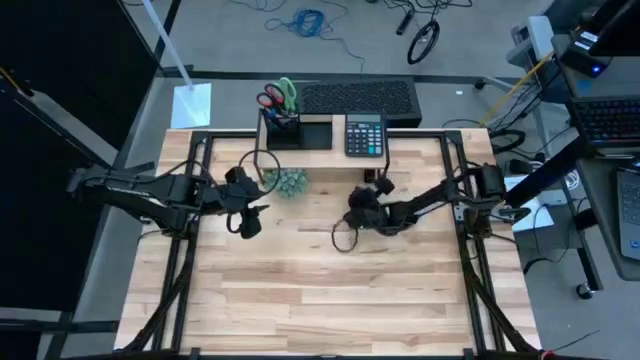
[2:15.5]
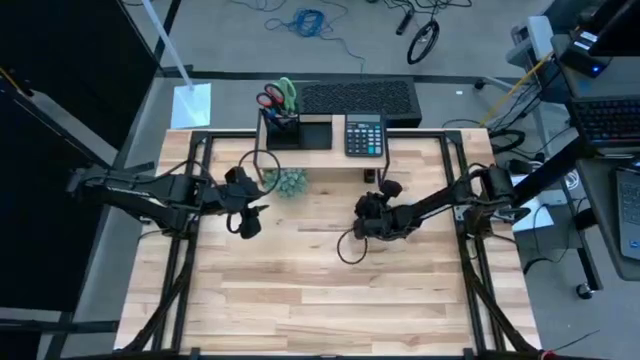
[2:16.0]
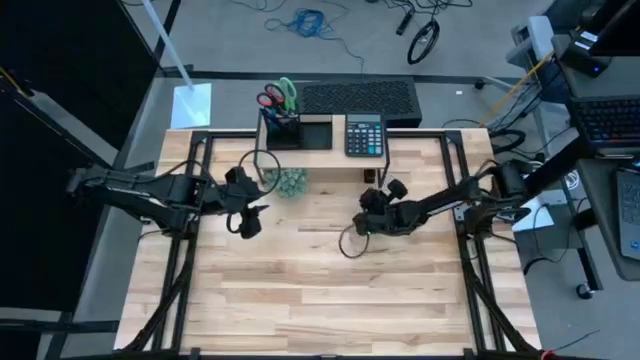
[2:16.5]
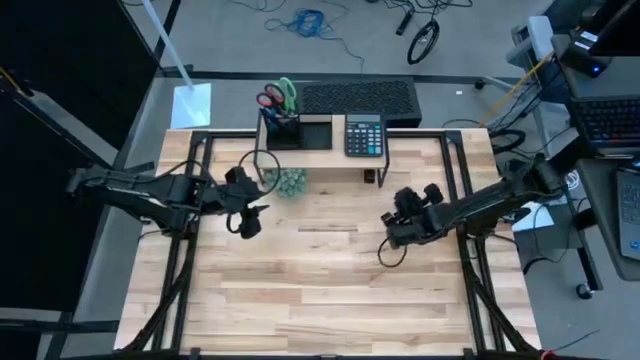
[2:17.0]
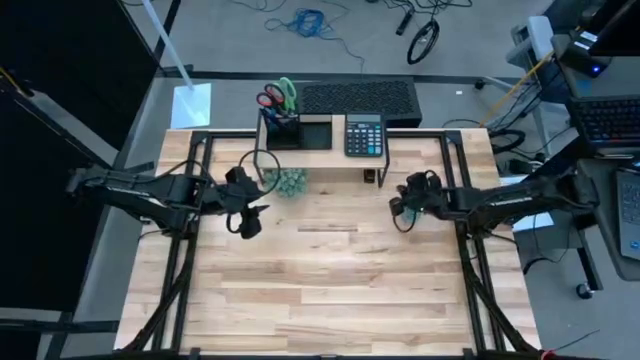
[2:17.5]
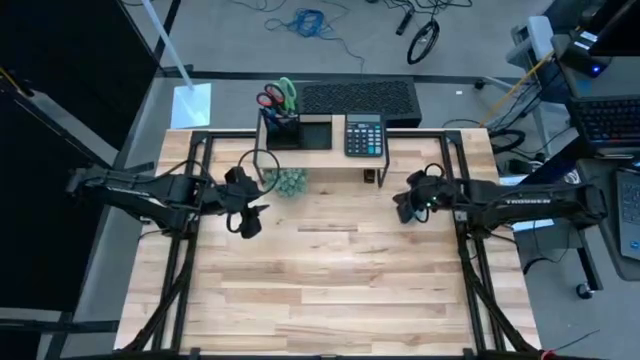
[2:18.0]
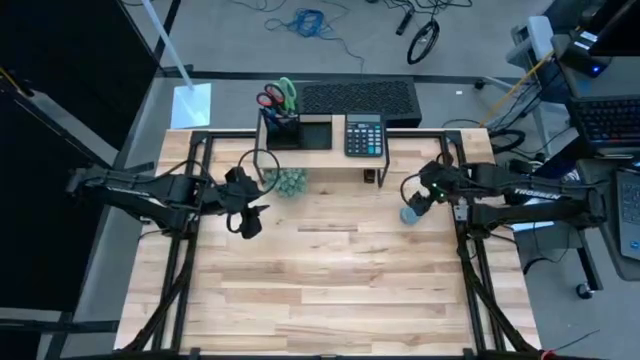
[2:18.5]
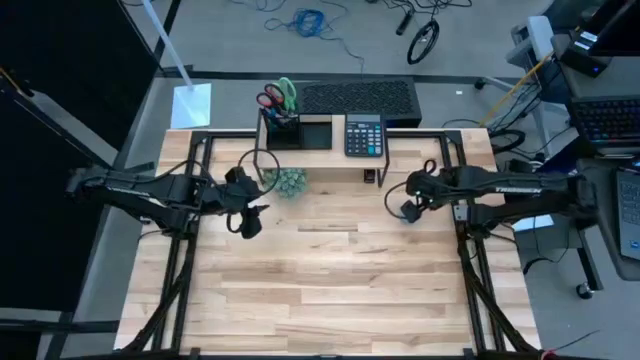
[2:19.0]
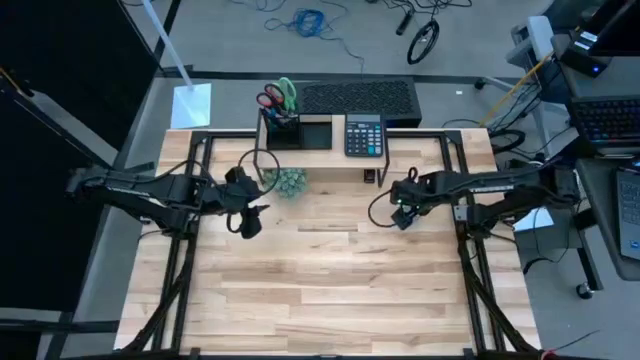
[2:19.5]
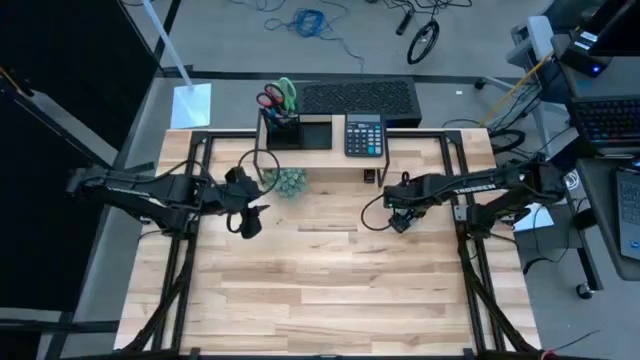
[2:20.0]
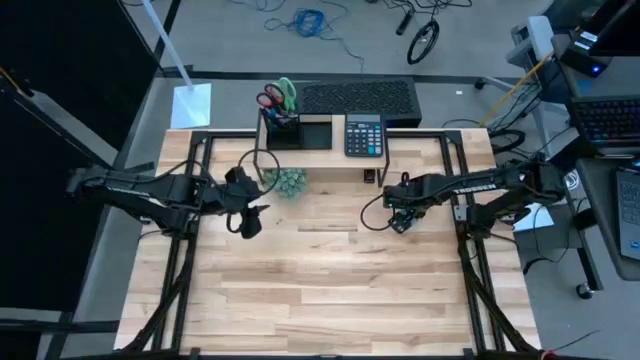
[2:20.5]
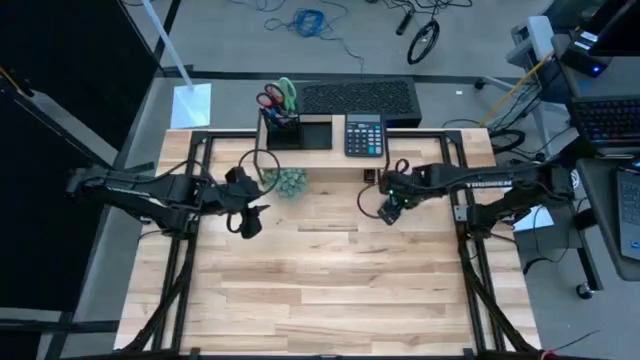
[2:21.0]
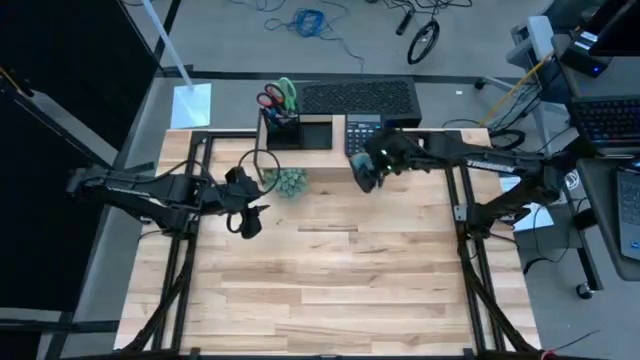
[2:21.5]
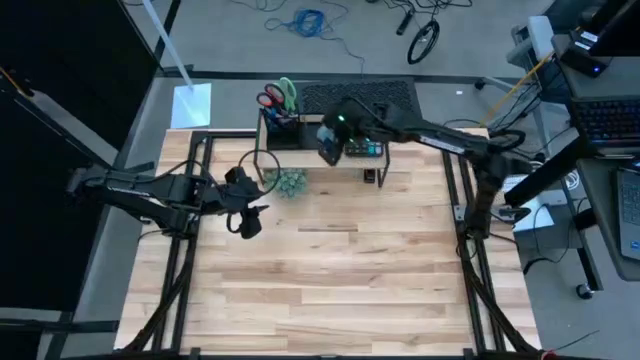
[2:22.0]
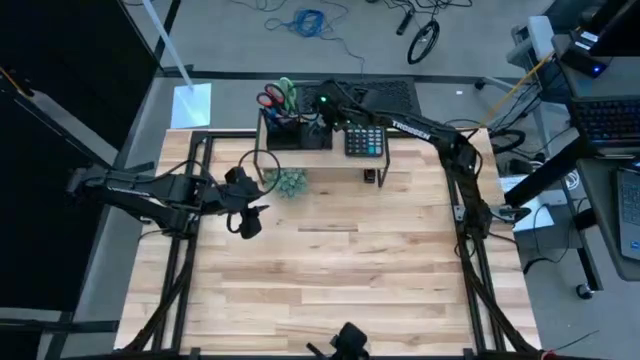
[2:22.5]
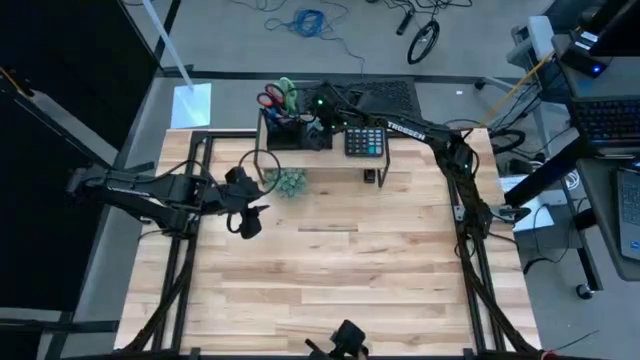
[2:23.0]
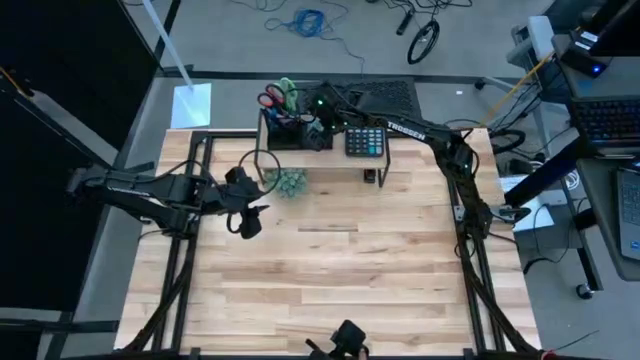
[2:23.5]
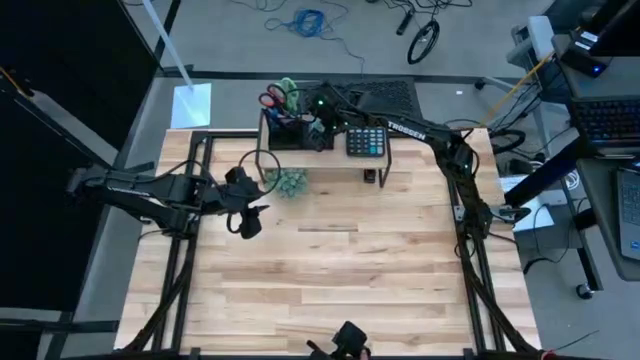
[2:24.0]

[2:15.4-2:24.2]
Task: Pick and place office supplies into organizer
Put the green scented candle into the desk organizer on the shelf

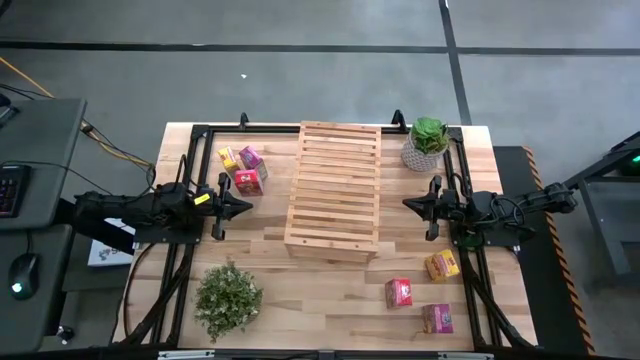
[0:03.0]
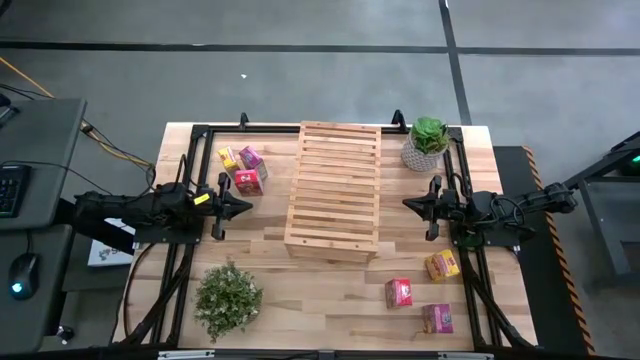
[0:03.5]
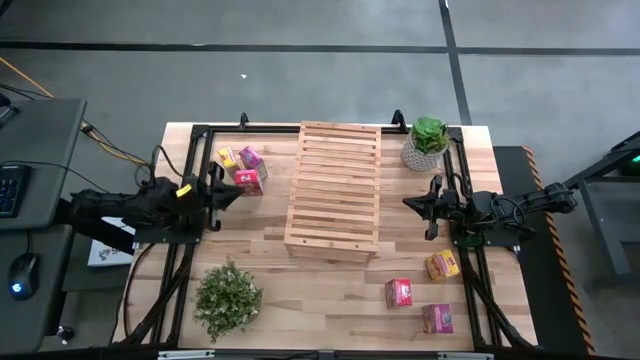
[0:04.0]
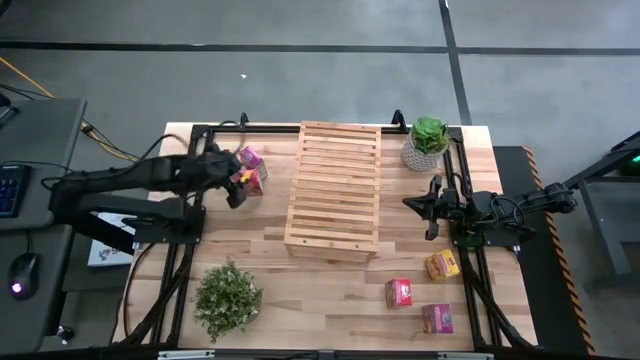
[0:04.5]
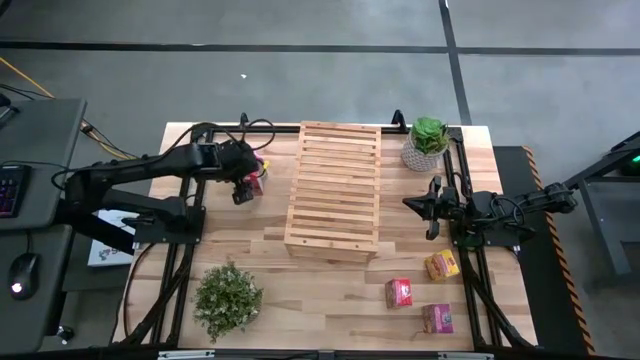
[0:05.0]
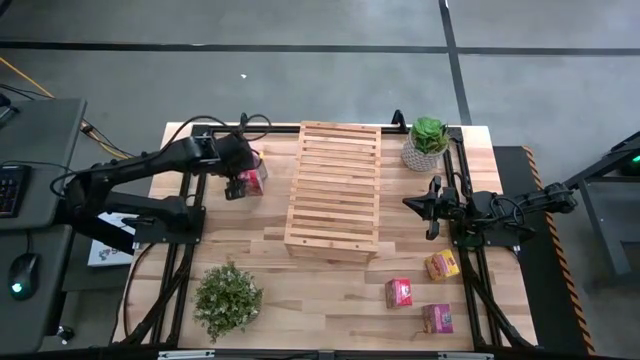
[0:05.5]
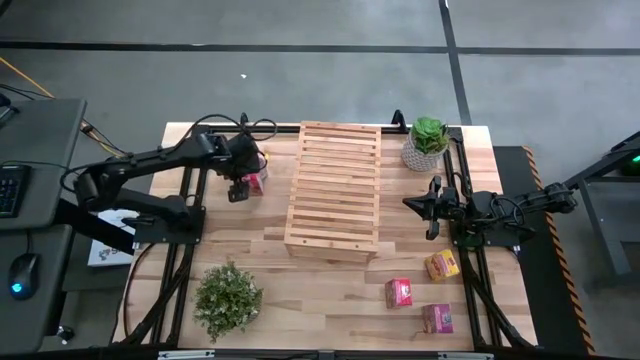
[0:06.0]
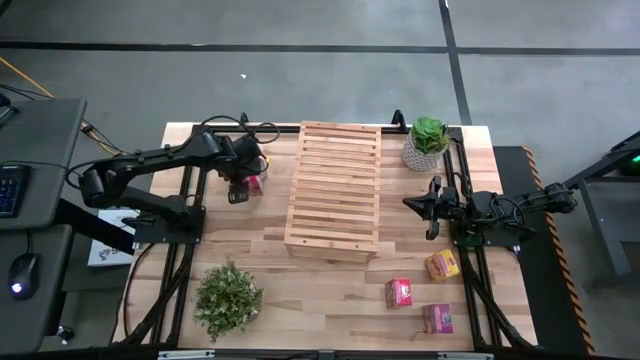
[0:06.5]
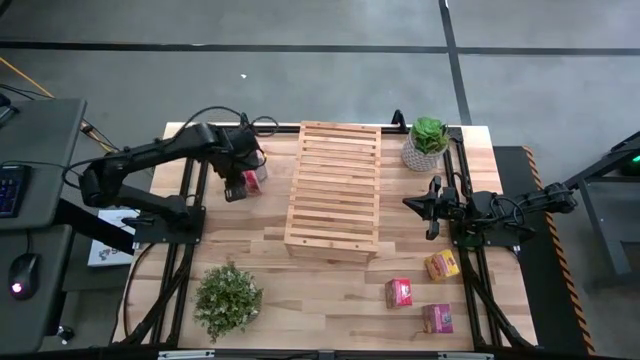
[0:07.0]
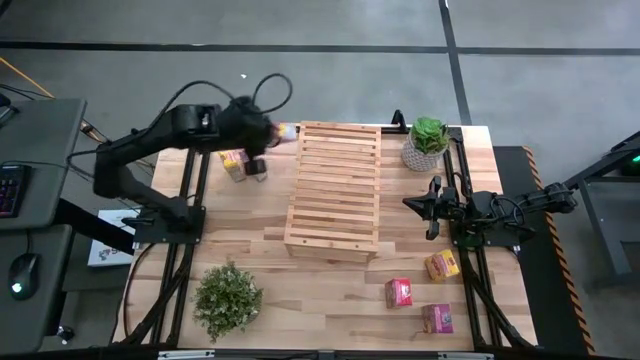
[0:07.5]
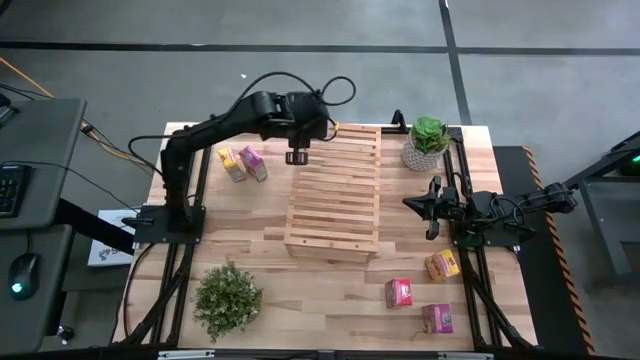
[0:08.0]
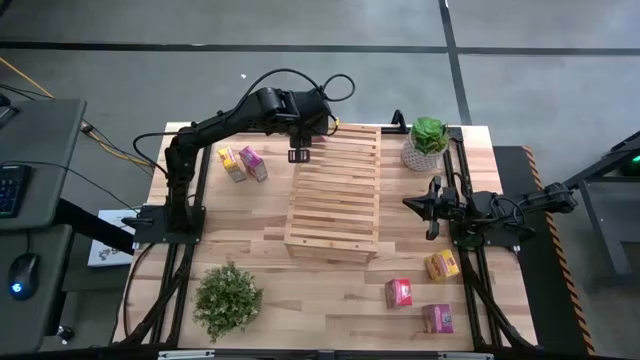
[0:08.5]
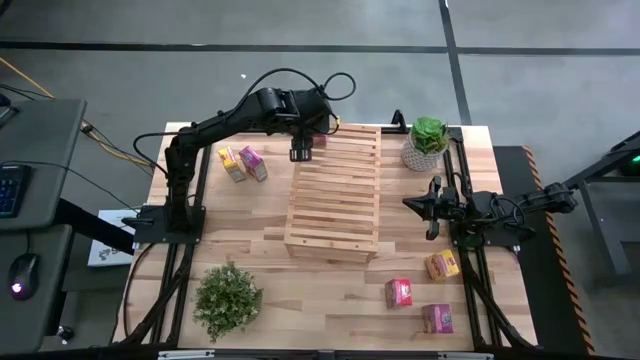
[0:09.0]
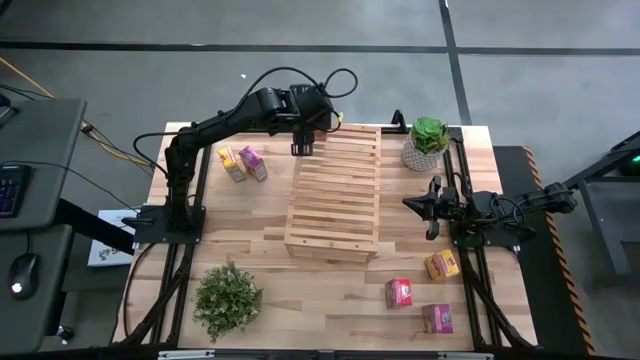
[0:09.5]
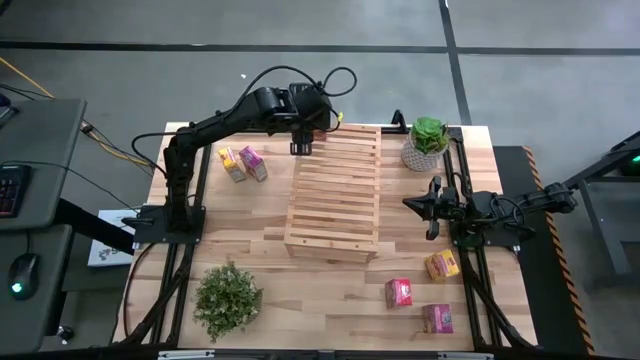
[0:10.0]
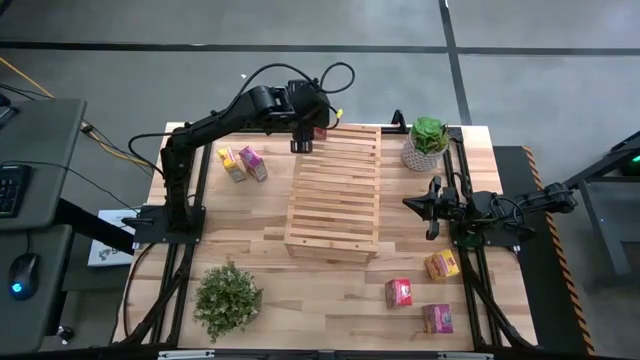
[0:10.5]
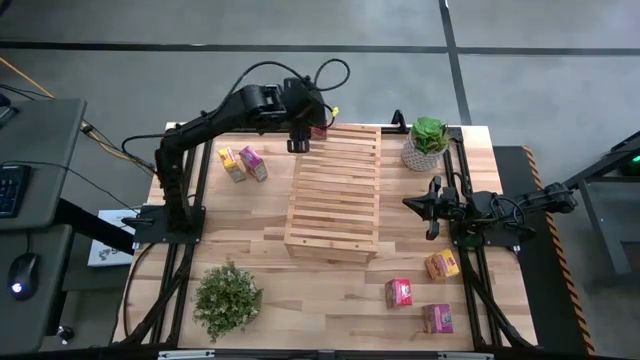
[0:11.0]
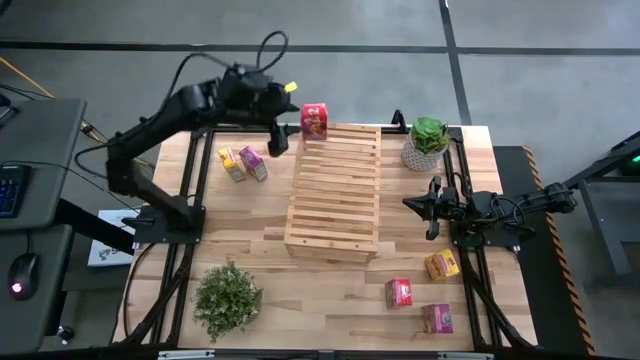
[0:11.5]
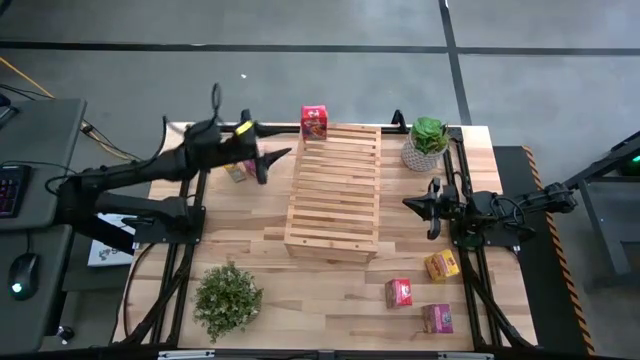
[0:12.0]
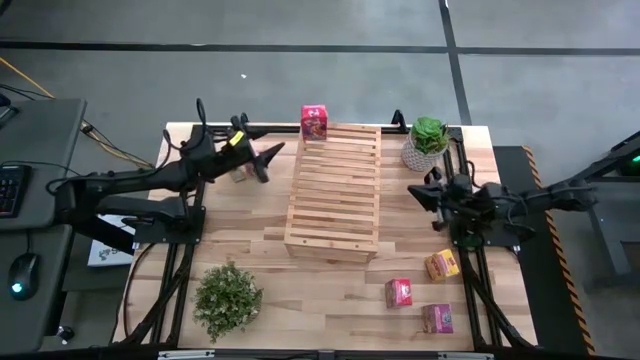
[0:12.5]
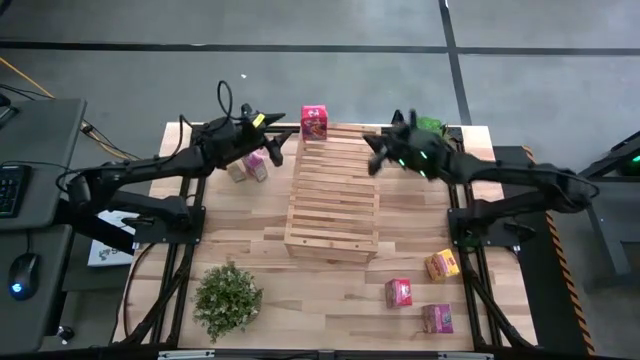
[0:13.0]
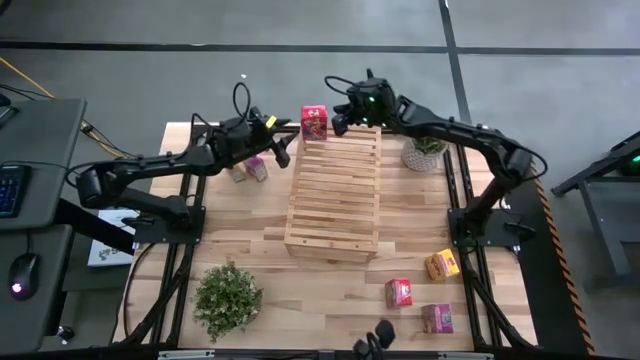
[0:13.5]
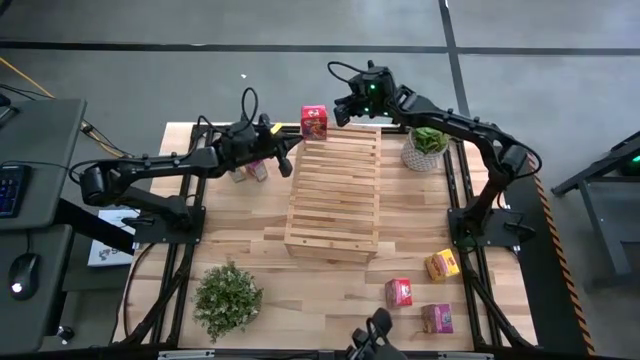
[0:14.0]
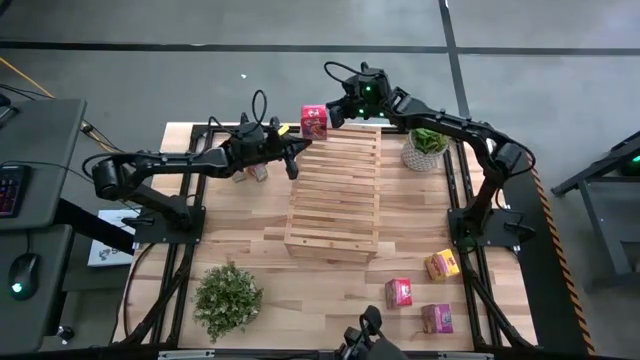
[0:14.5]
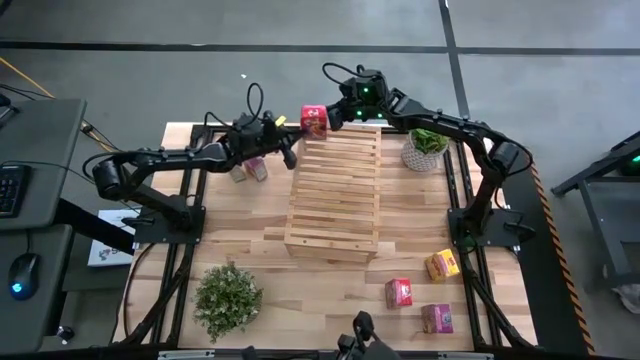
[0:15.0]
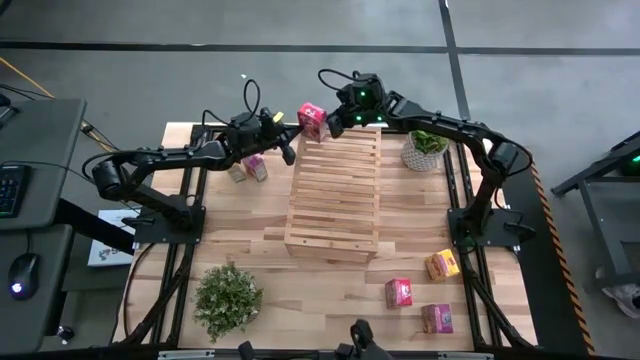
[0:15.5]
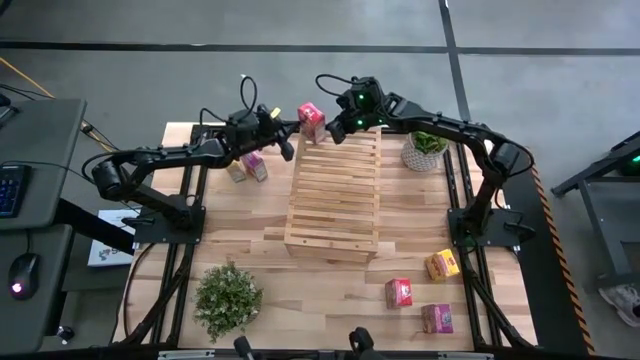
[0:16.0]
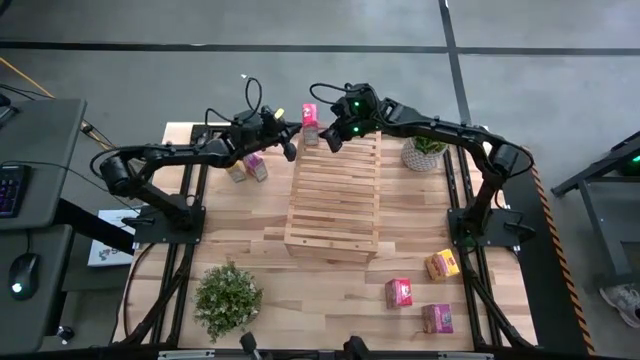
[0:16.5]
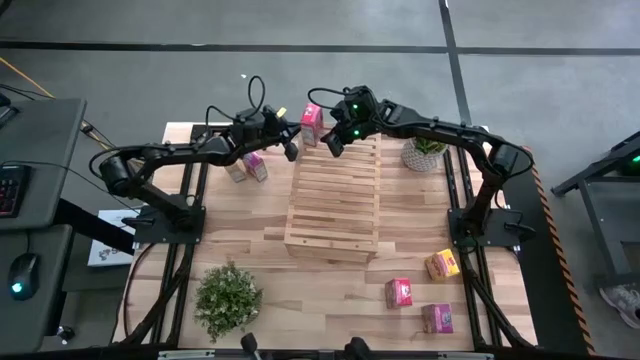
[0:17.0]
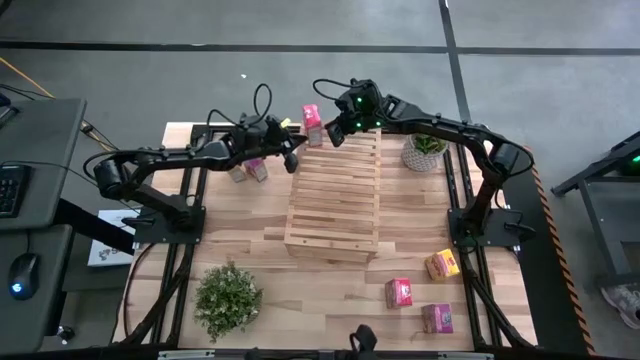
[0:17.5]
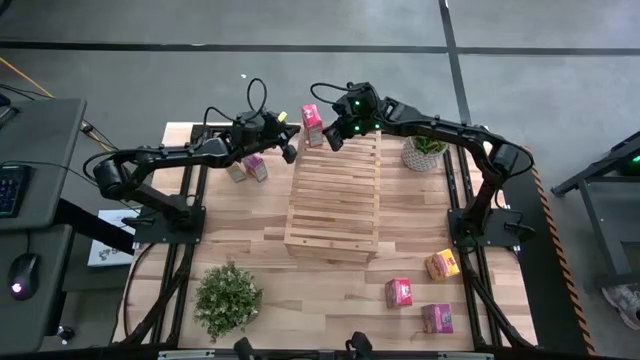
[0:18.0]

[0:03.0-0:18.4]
Task: Stack cereal on shelf
Put the top red cereal box on the shelf
